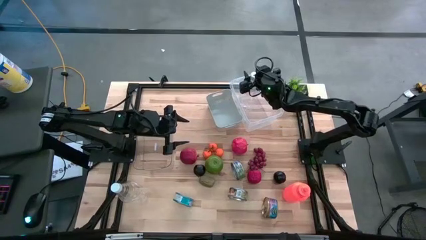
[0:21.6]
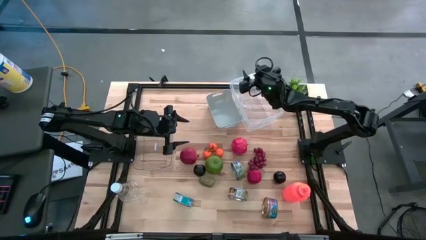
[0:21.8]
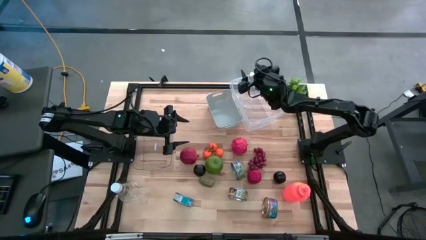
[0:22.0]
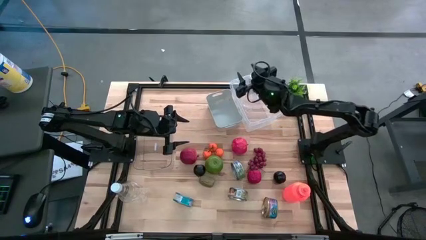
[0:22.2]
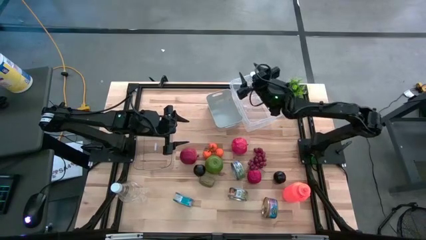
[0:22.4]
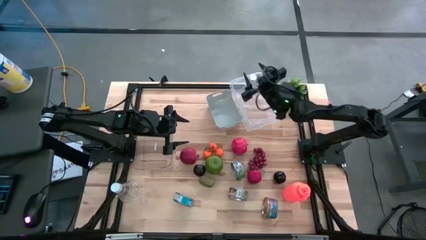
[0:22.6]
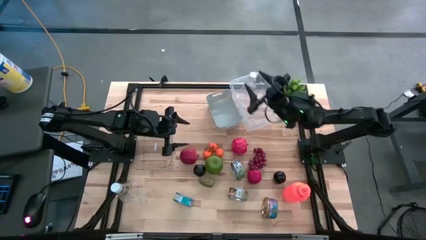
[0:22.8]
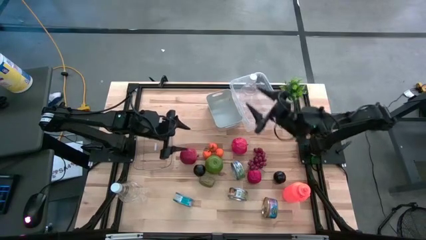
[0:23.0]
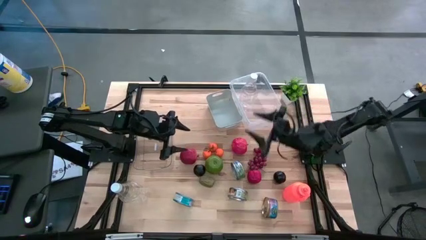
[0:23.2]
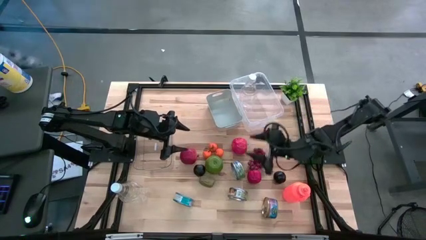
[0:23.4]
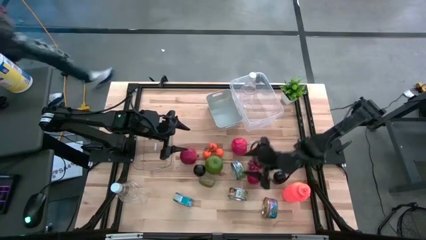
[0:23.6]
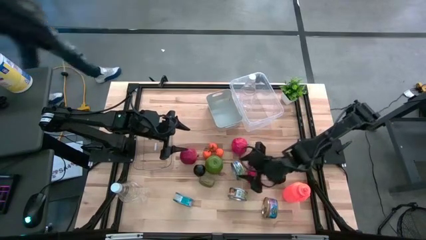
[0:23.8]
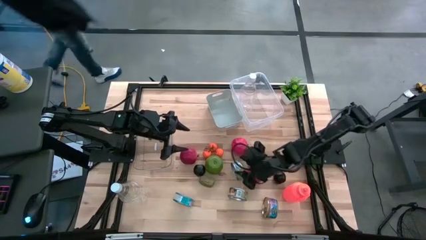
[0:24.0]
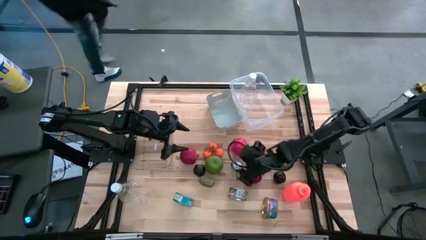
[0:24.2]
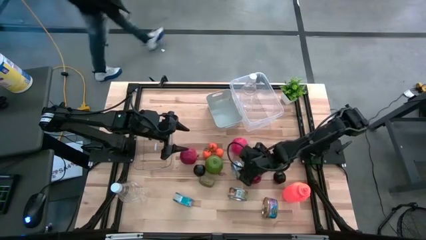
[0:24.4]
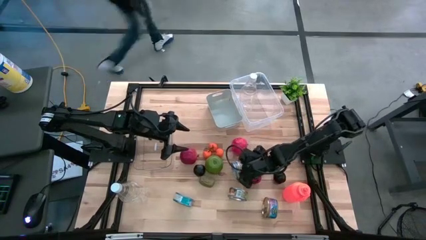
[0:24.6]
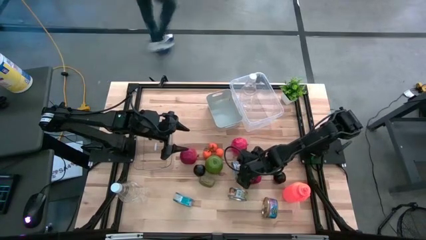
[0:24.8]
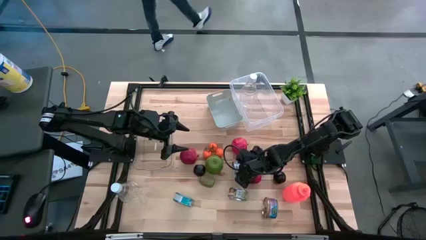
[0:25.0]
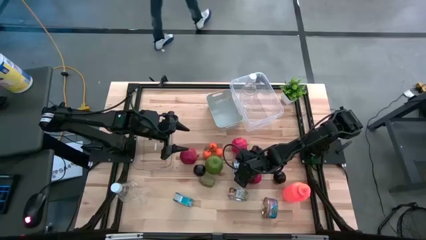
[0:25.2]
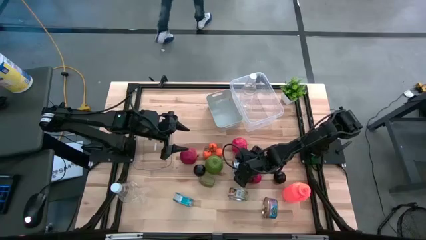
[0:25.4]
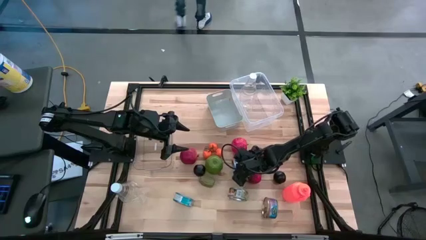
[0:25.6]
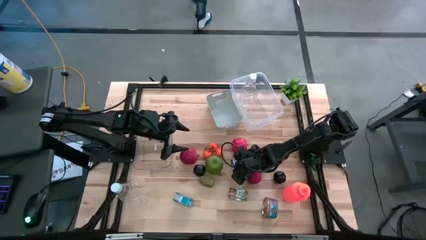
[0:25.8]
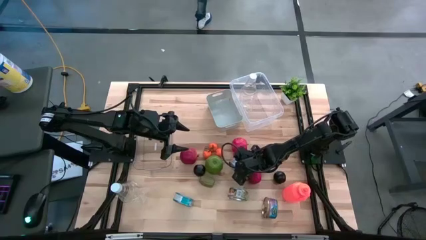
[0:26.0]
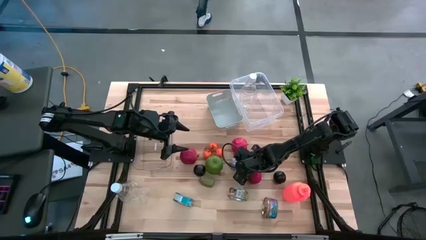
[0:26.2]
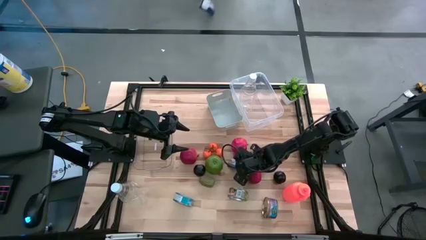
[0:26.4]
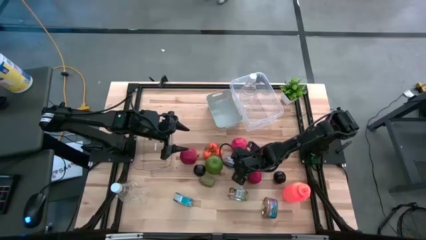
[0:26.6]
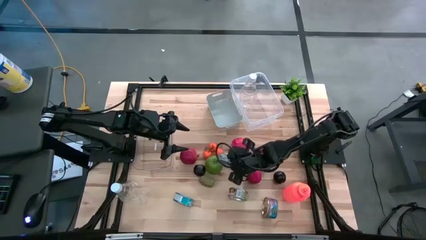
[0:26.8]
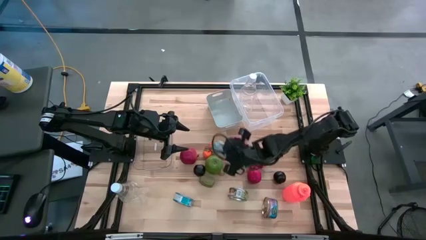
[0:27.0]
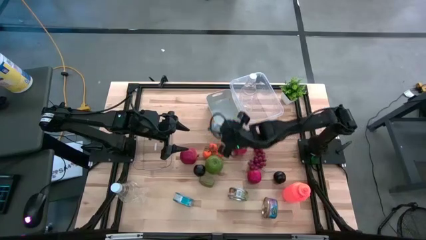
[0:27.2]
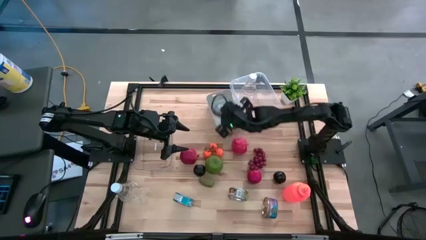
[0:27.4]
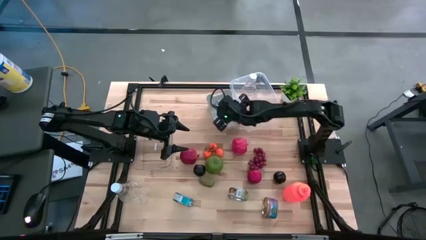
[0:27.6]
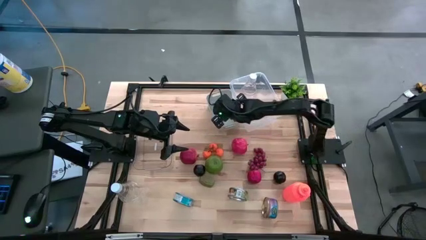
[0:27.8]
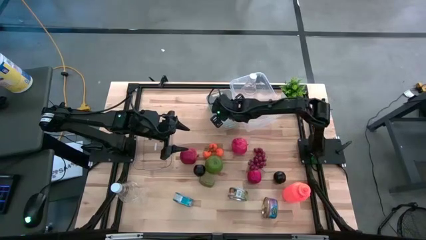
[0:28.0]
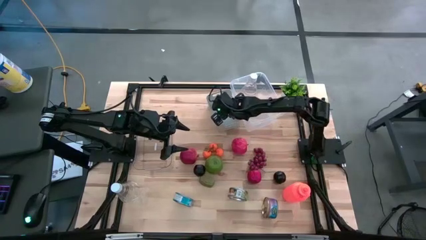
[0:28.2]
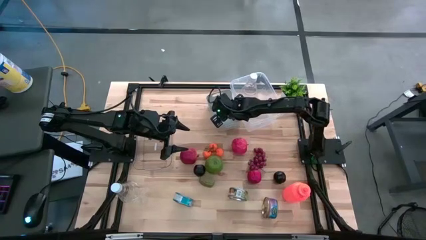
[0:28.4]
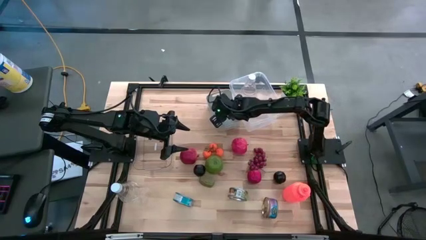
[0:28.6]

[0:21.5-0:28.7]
Task: Pick & Place Food Item
Put the top green tuna can into the white bin

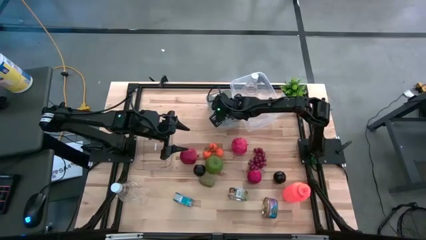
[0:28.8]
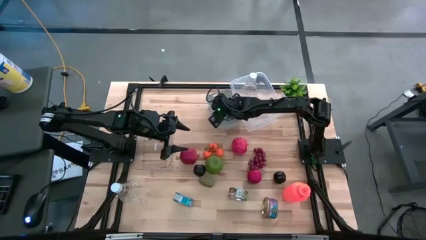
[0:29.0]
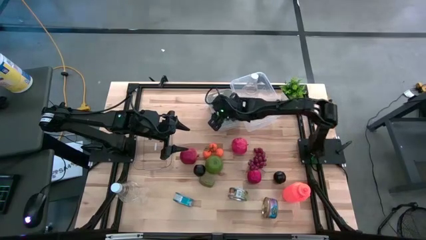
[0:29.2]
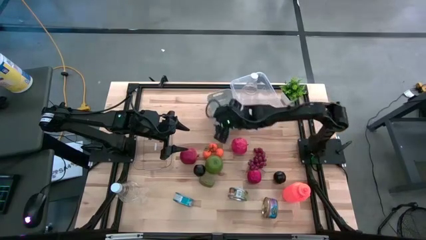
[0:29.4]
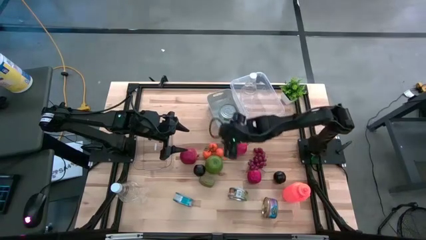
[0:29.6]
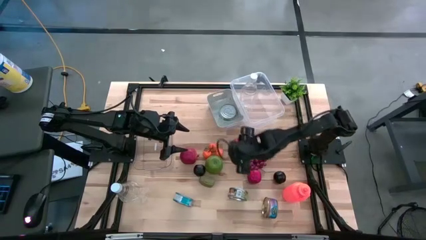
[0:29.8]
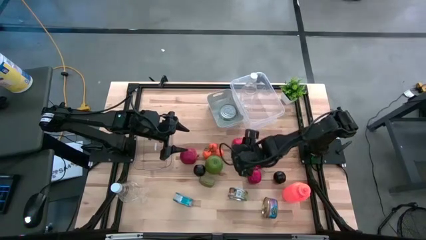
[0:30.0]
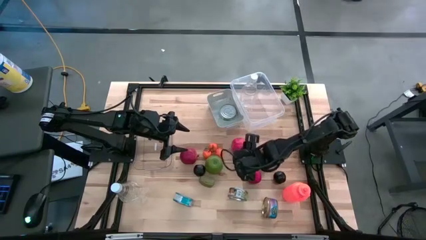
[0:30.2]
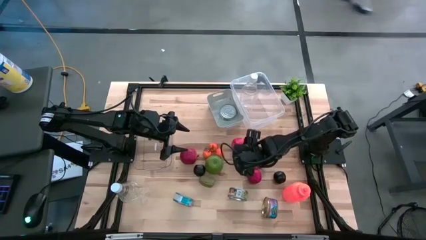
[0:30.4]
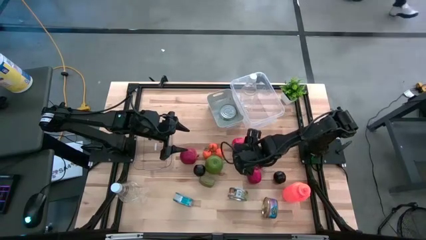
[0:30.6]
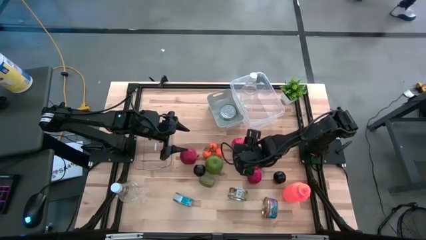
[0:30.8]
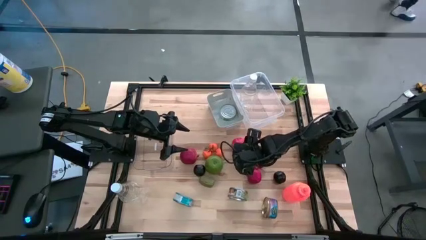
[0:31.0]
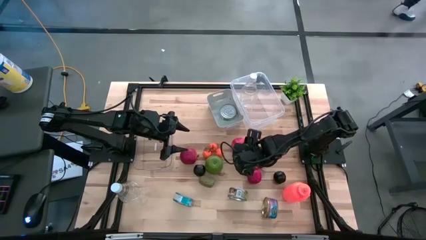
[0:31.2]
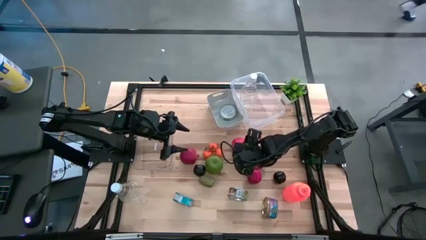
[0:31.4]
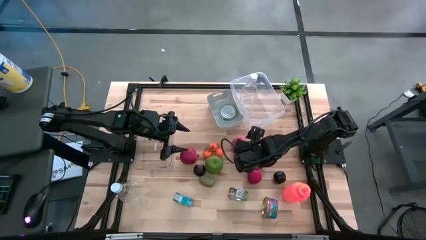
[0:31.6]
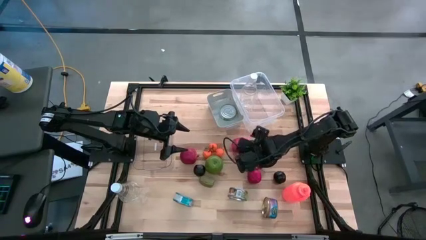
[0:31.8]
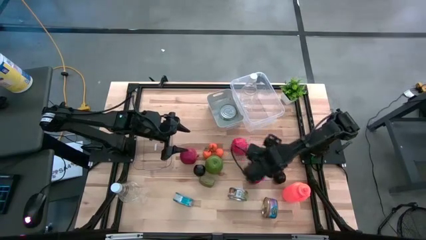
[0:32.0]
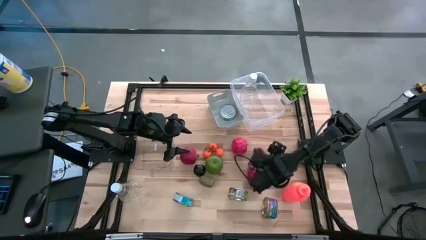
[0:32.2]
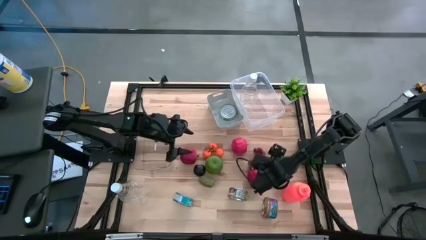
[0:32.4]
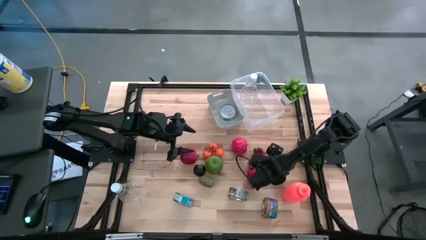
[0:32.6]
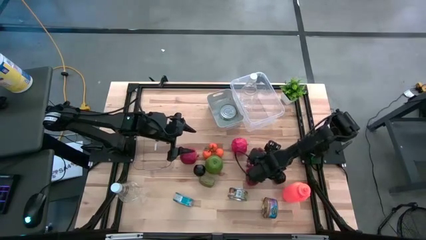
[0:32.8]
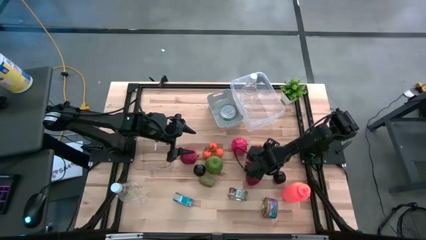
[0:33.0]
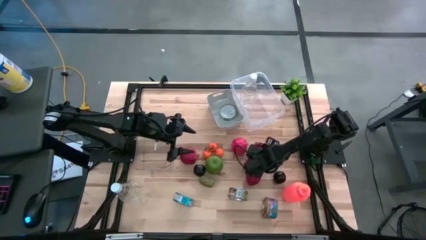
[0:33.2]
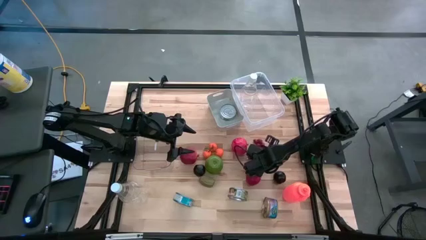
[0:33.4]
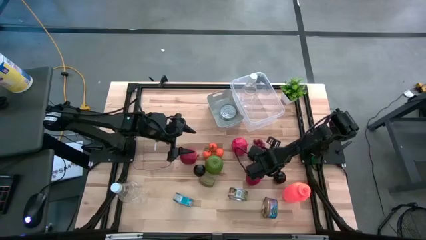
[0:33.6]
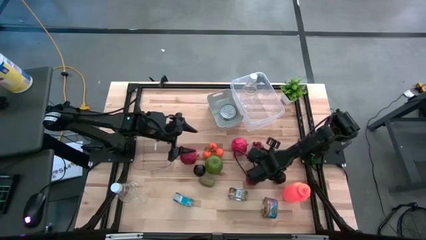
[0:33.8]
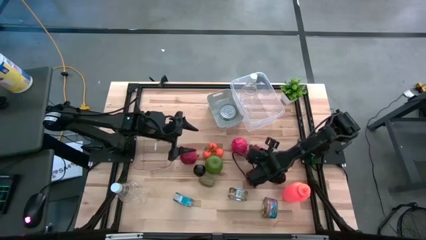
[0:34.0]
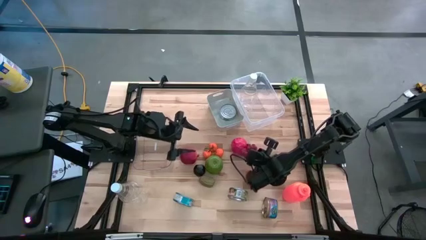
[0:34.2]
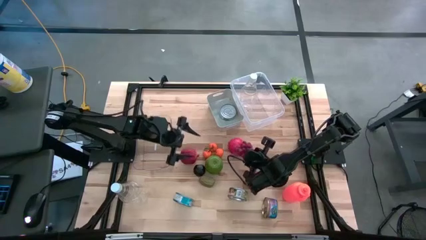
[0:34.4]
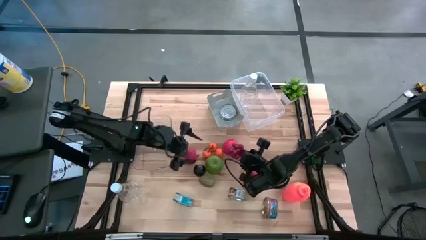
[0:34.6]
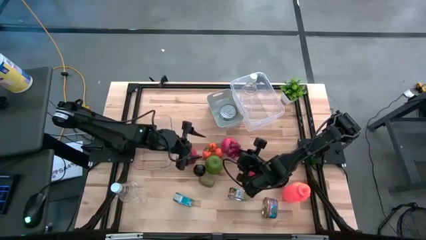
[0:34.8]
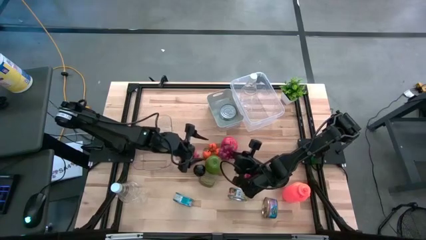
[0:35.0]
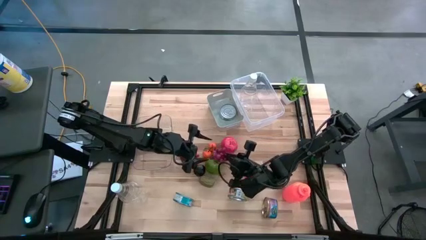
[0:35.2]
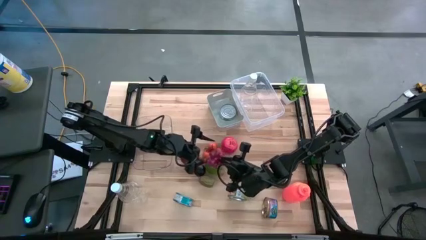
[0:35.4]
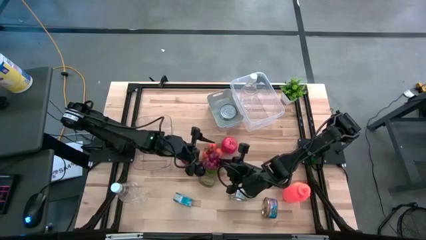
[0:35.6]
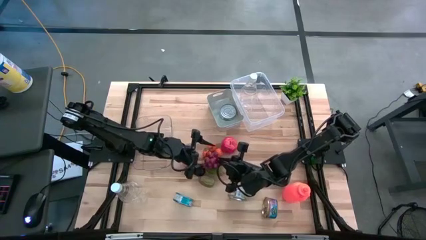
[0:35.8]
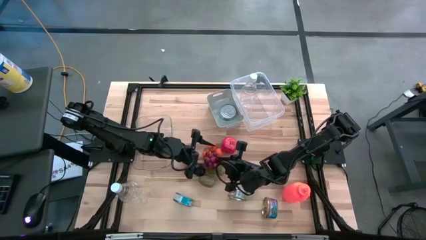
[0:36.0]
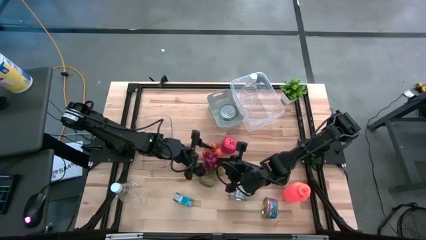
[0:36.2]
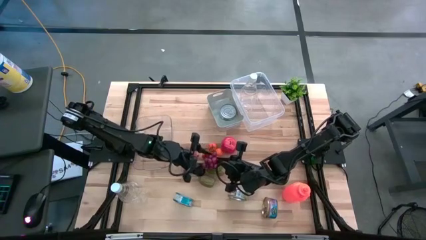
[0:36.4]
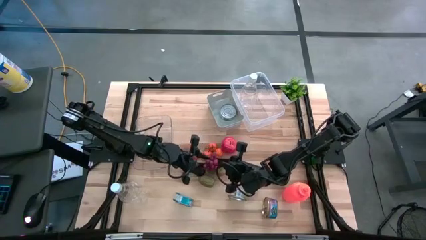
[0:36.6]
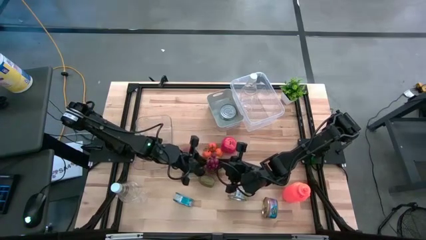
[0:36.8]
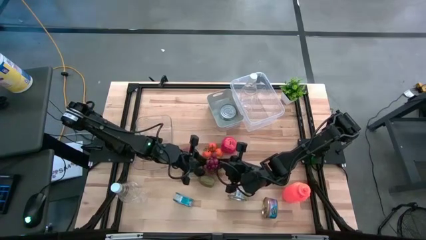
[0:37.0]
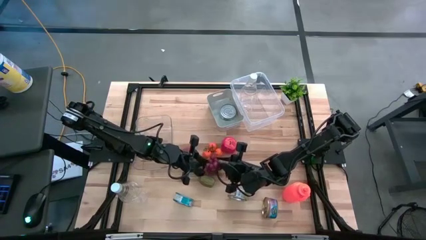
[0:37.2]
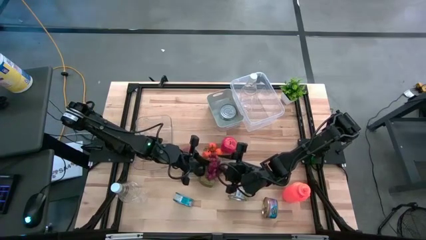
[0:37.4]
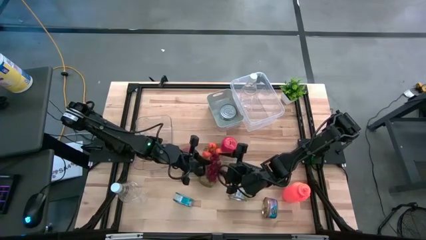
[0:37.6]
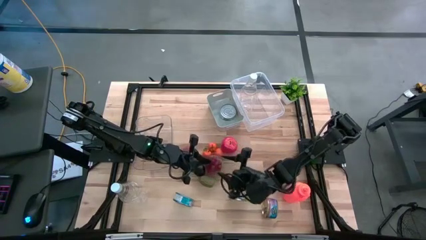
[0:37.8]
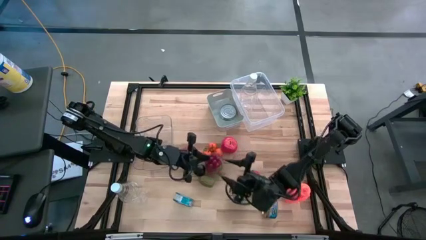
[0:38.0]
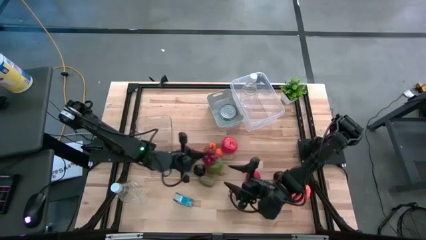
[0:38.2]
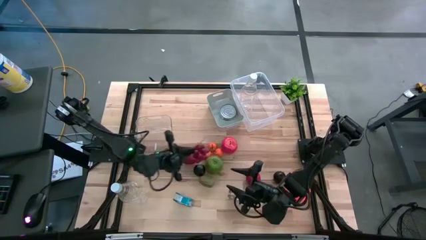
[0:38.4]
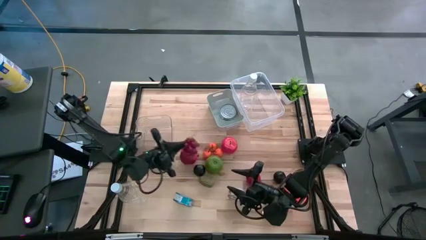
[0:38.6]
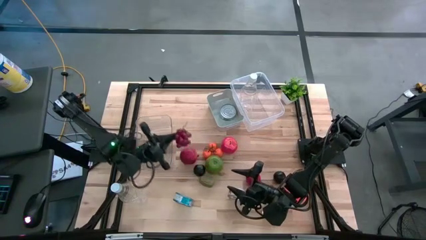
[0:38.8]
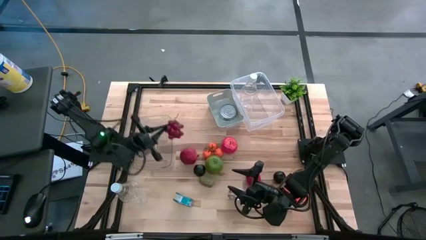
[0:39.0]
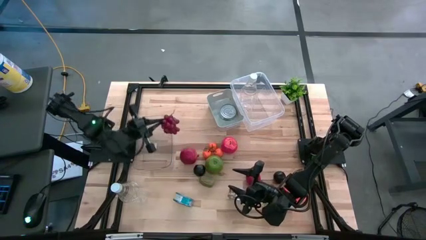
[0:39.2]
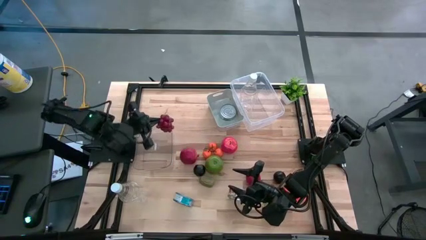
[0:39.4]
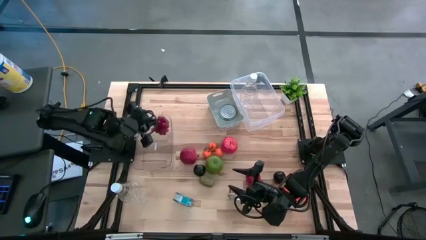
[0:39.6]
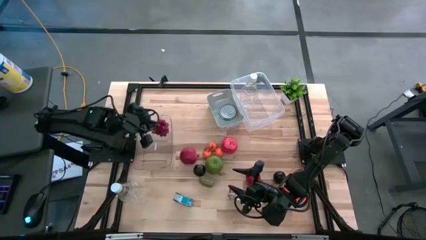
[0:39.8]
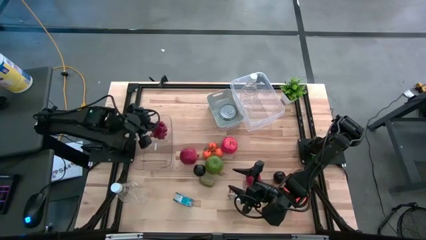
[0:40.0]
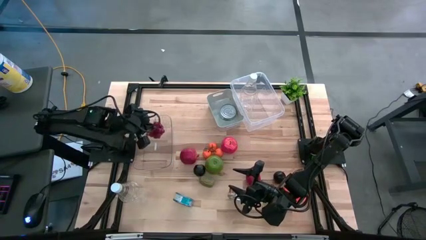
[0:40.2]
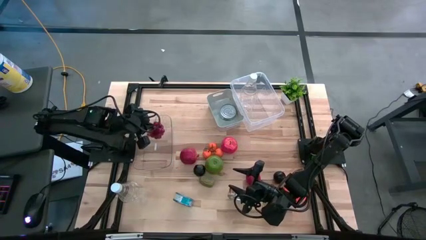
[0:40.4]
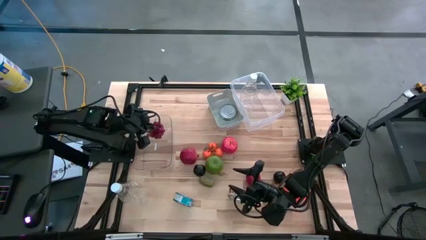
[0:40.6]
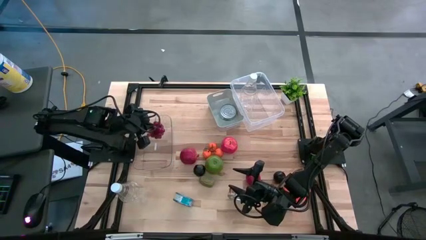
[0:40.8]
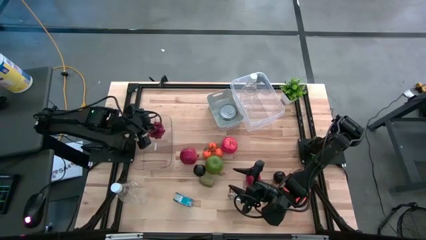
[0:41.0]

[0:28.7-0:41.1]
Put the red grapes into the left transparent bin
